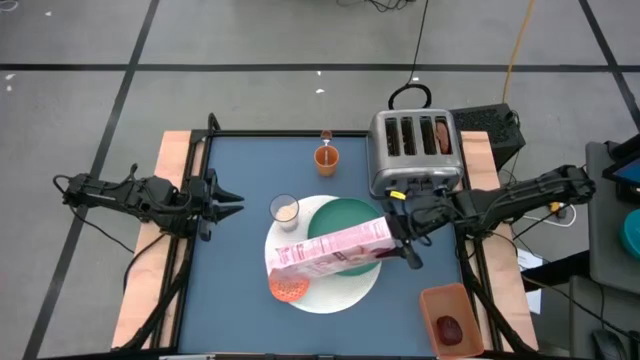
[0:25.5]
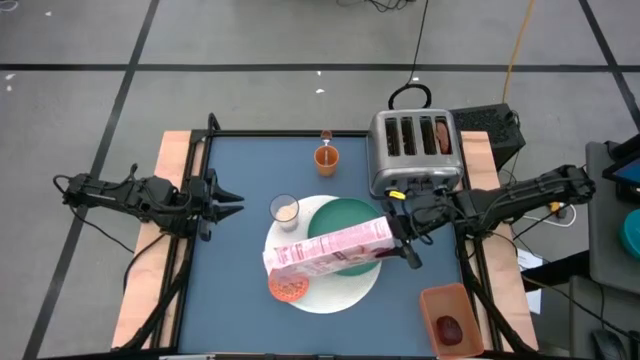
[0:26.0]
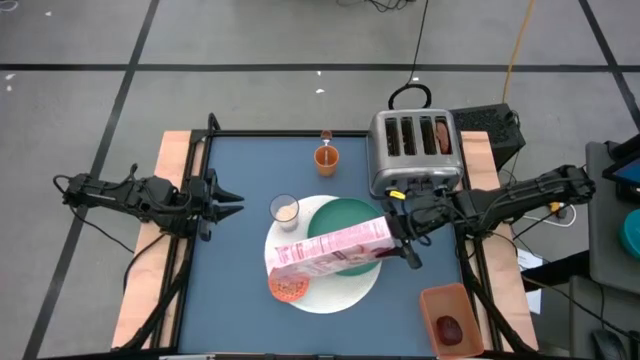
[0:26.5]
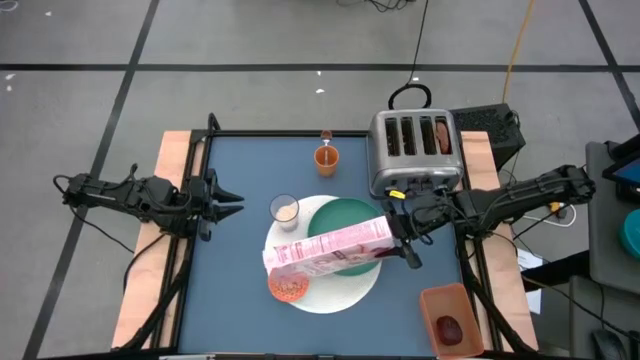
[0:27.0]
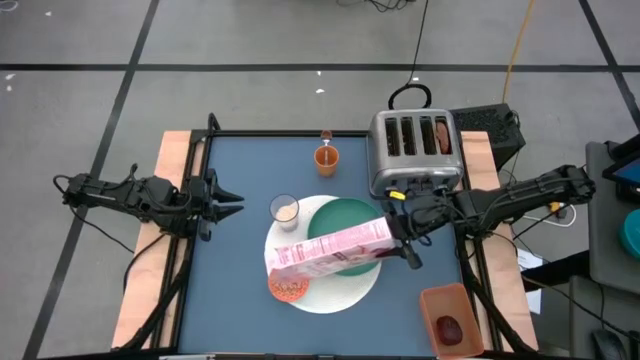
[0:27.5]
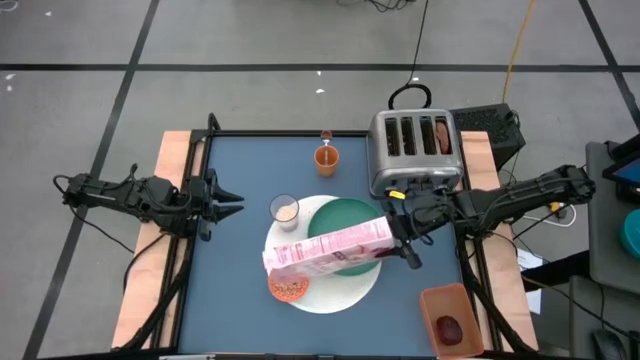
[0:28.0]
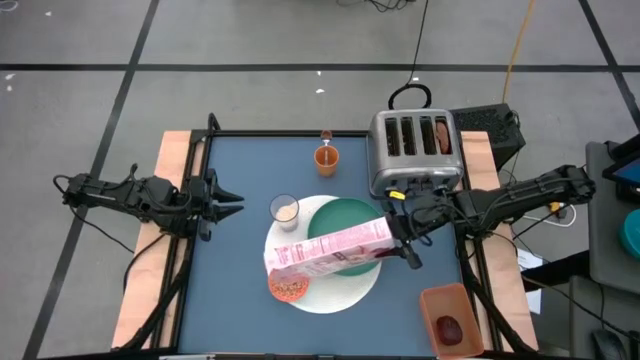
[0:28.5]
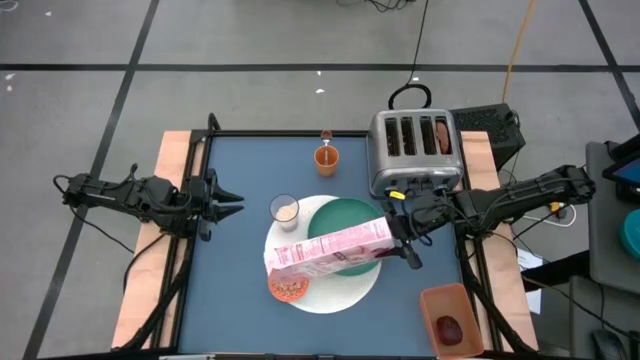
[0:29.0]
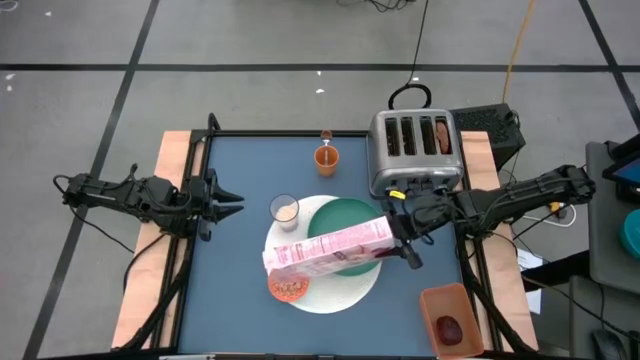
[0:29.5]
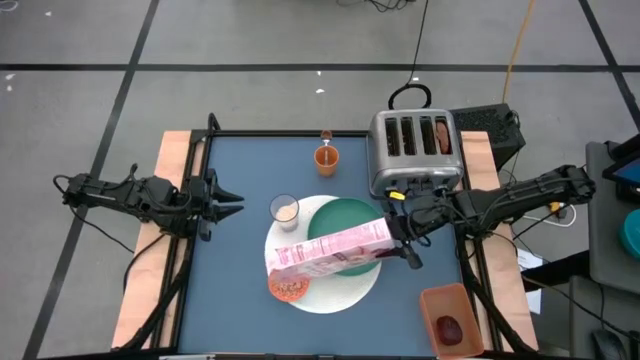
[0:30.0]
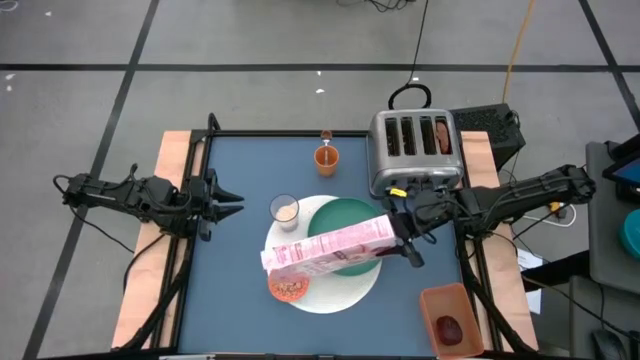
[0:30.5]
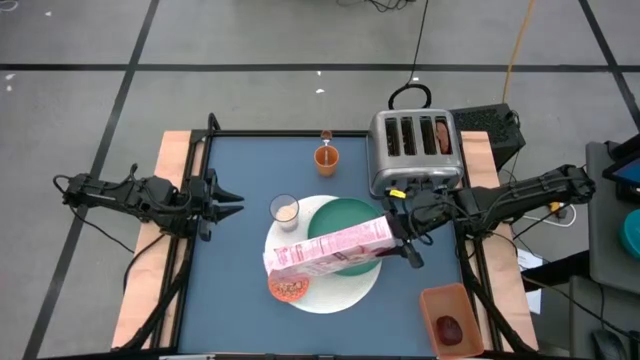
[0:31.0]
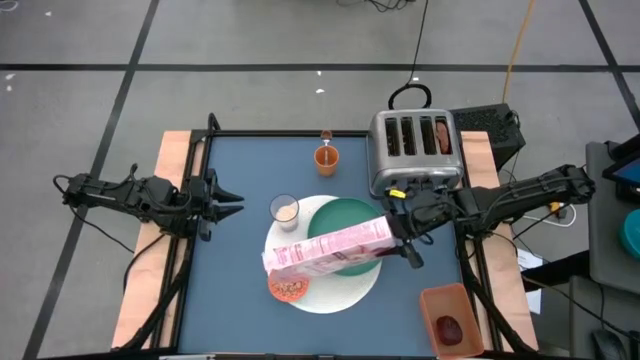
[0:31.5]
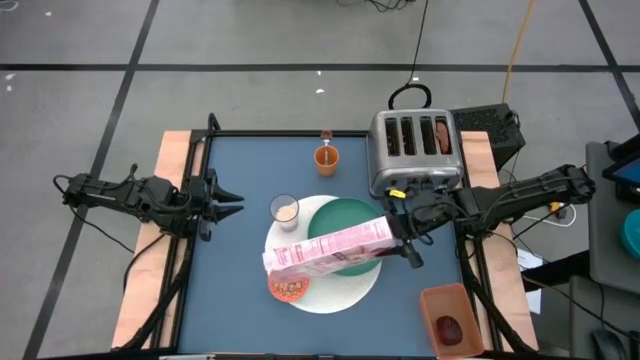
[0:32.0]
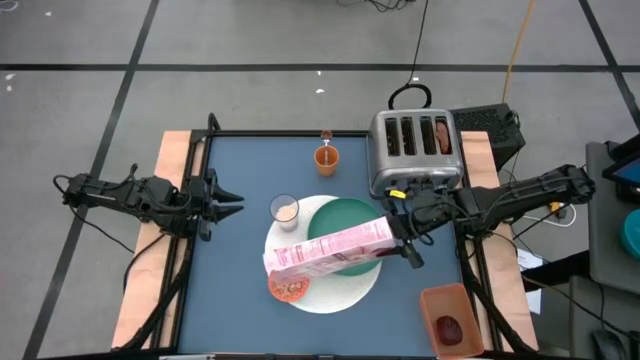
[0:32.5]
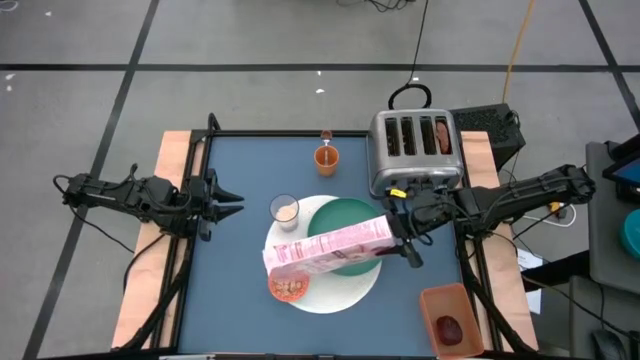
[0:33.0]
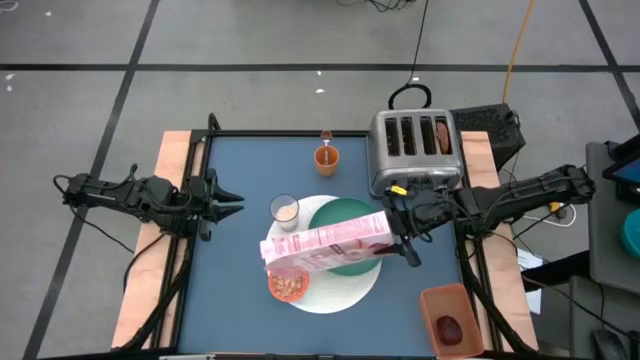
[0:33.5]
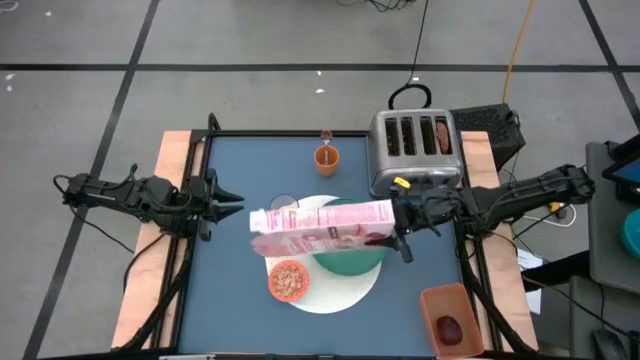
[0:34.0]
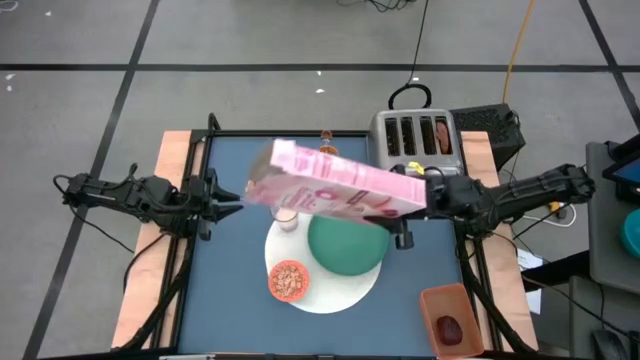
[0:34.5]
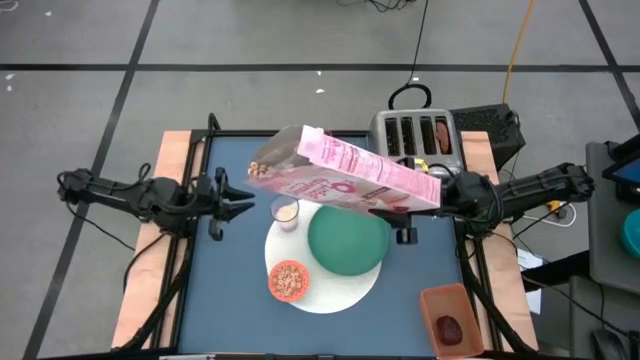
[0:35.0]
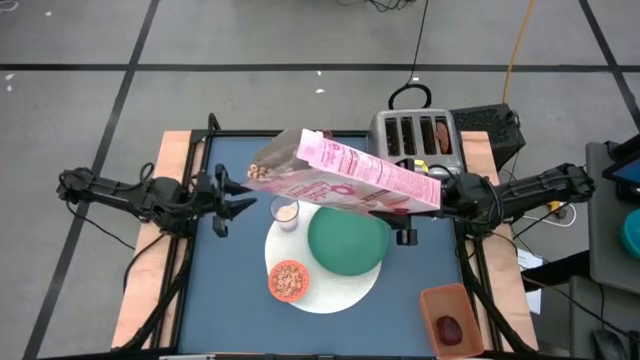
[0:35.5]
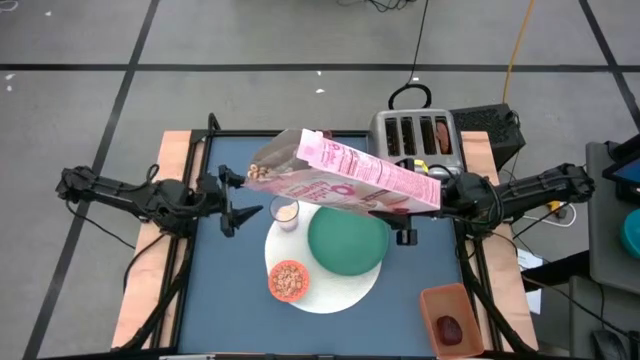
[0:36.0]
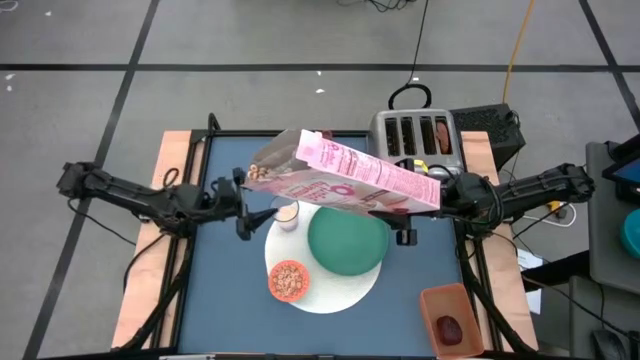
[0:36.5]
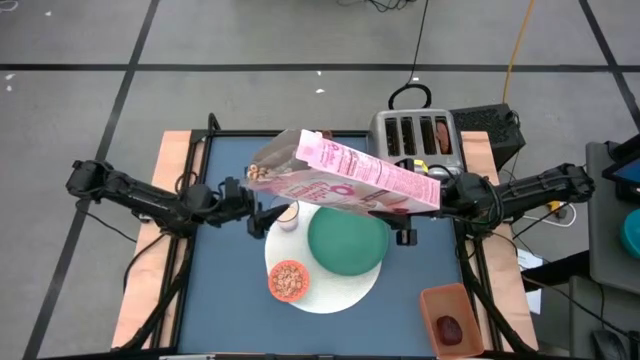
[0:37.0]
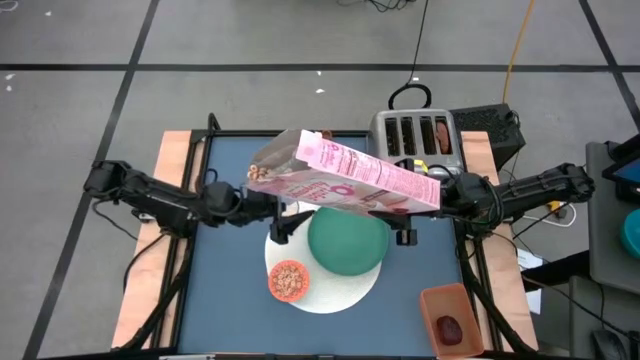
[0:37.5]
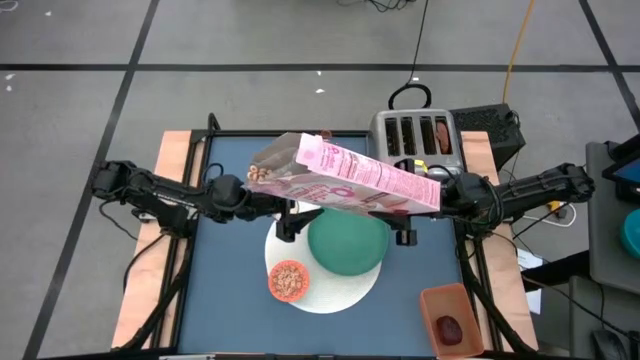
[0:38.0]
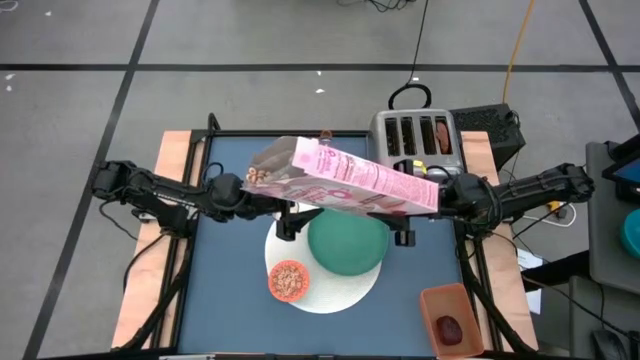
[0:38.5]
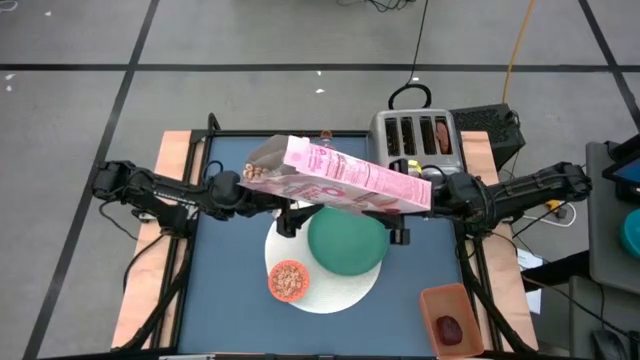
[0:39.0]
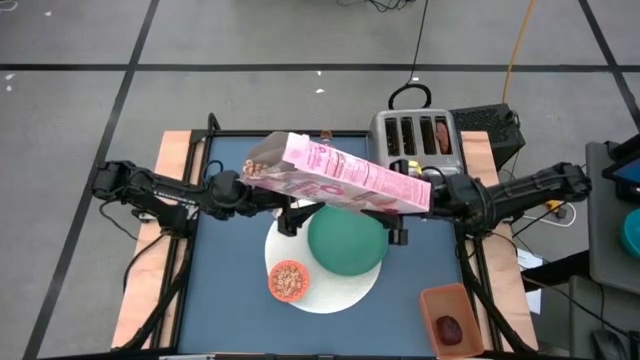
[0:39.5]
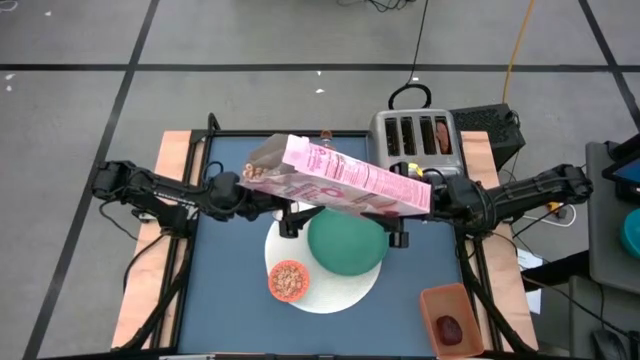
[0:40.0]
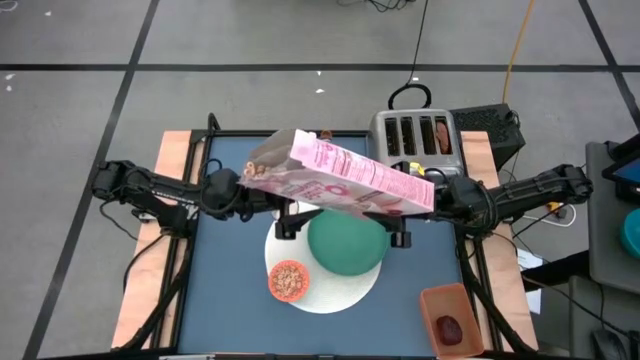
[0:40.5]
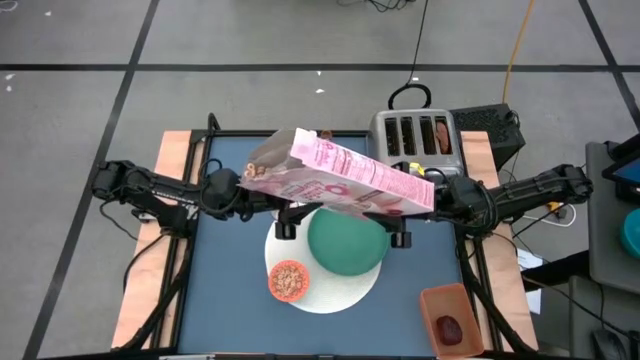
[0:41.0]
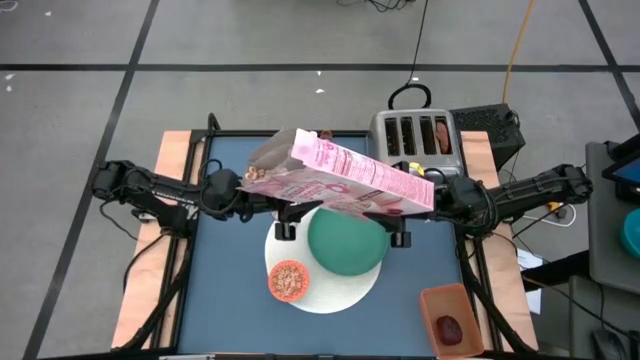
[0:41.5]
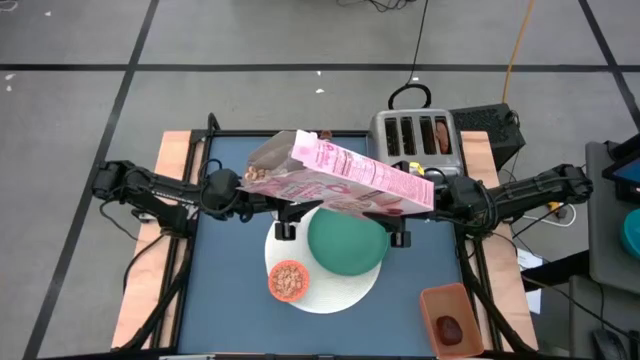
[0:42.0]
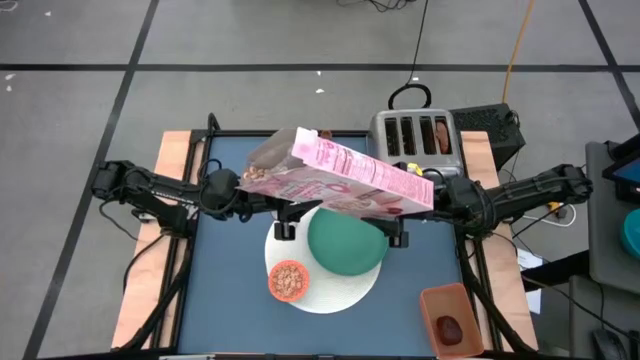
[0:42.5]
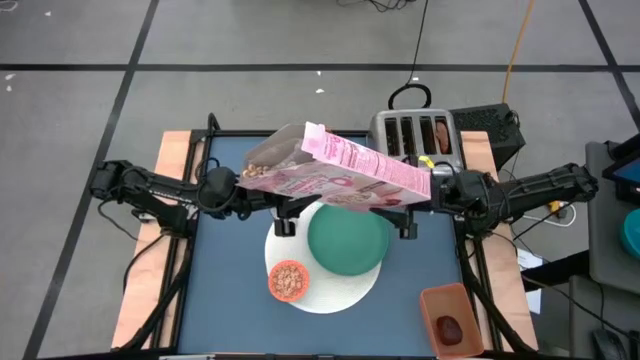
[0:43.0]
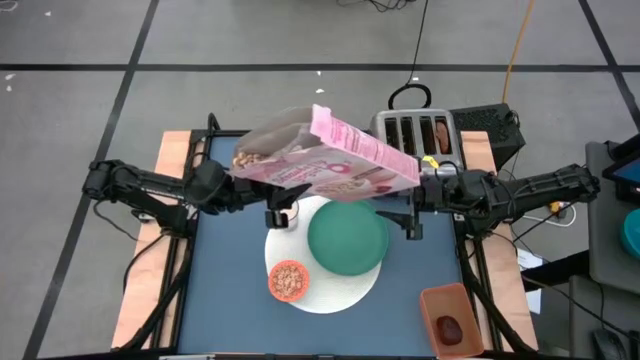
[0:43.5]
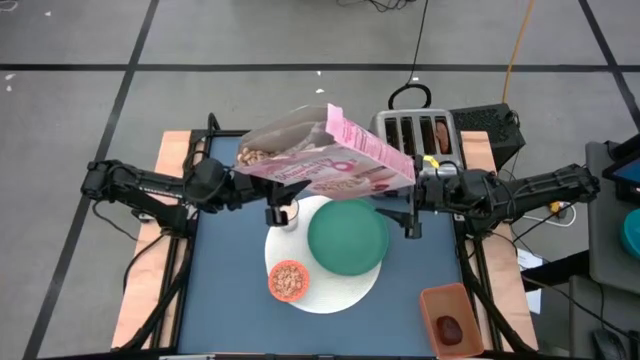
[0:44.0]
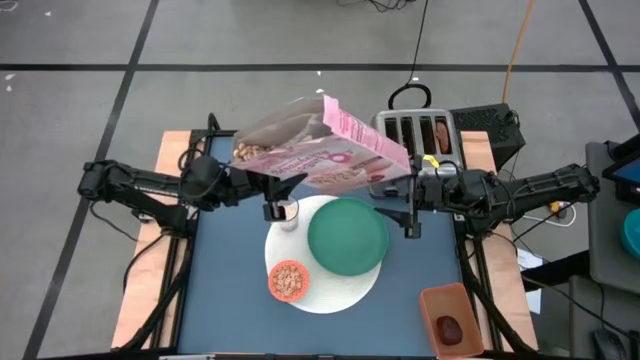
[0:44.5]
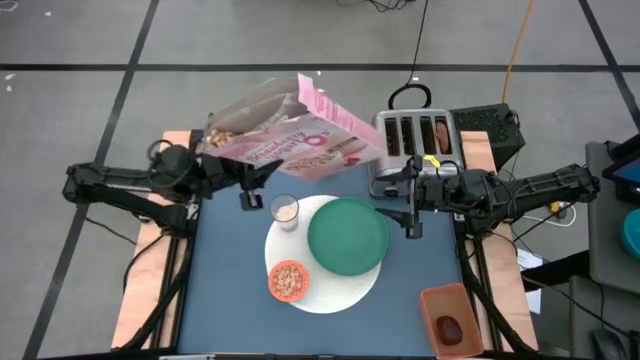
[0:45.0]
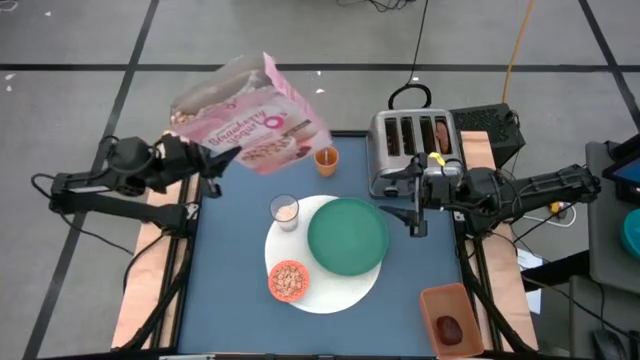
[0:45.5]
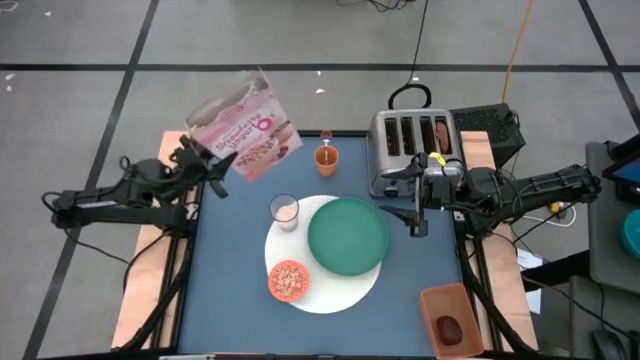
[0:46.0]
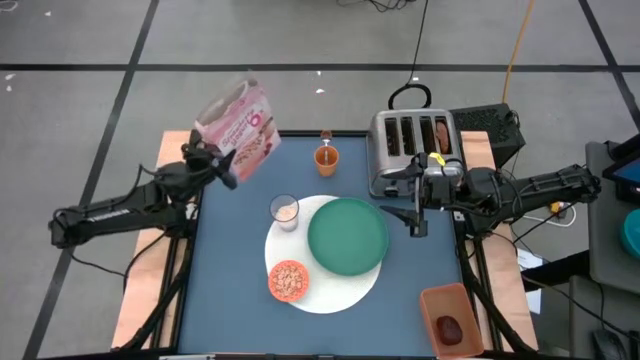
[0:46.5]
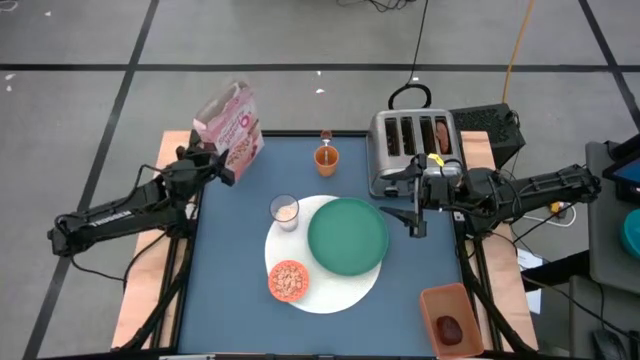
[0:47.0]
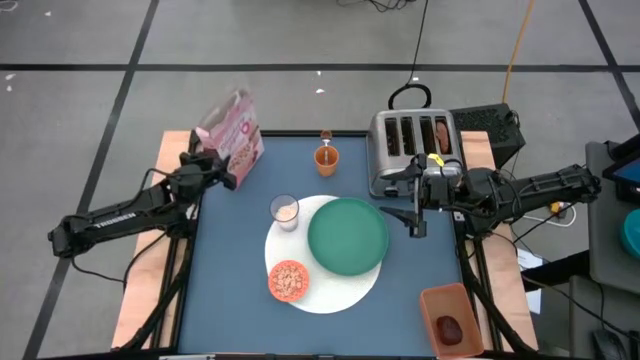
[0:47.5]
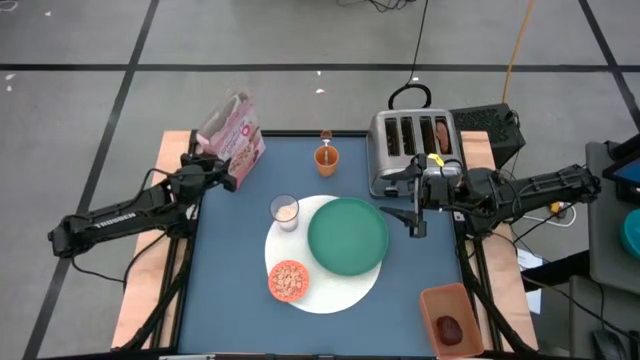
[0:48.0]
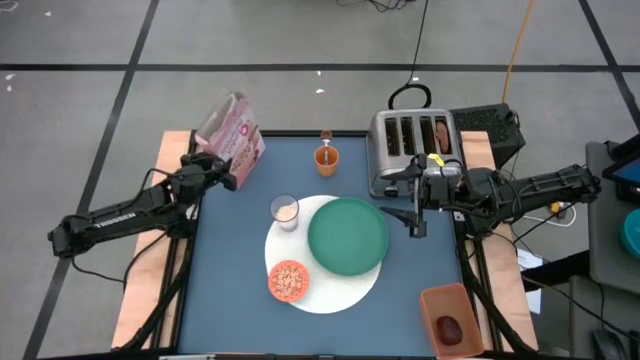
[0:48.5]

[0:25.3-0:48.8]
Task: Arrange a breakfast setting
Pour the cereal into the orange patterned bowl
